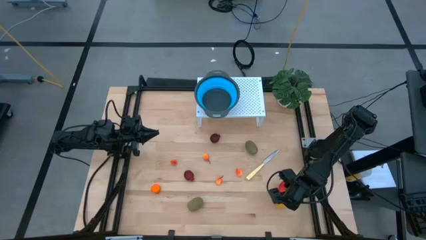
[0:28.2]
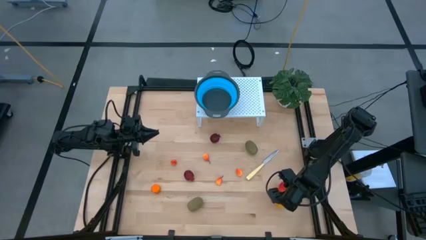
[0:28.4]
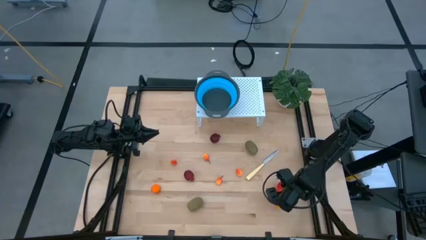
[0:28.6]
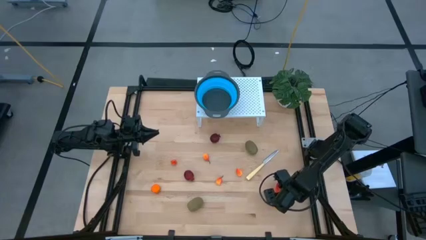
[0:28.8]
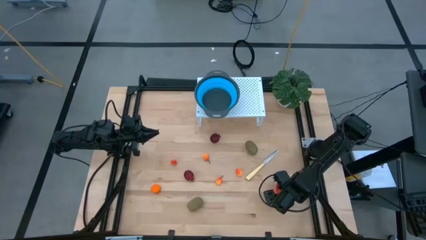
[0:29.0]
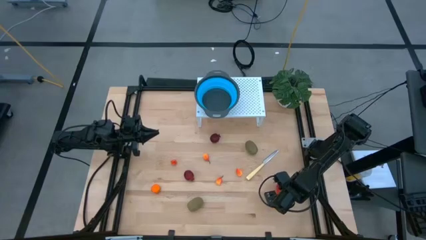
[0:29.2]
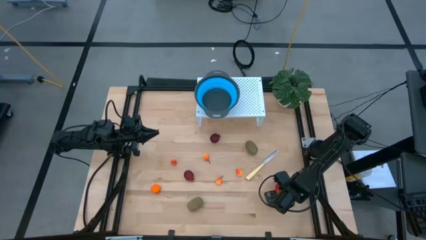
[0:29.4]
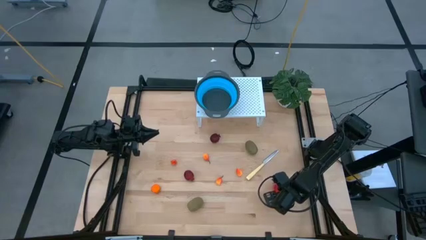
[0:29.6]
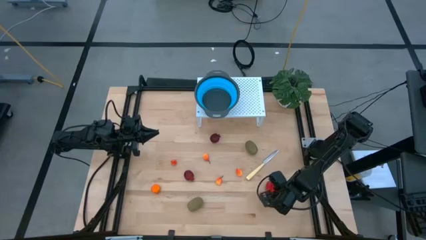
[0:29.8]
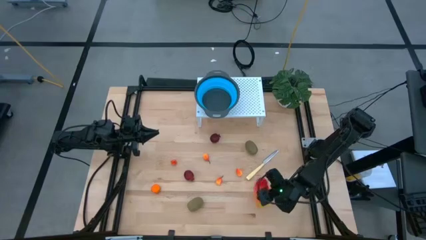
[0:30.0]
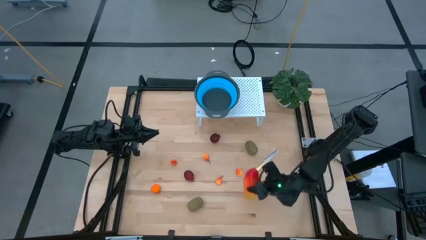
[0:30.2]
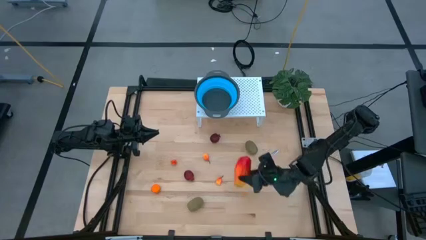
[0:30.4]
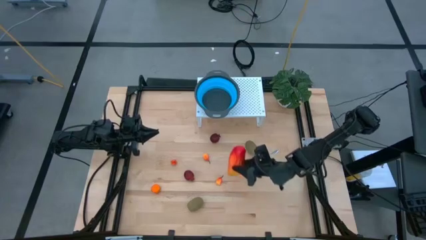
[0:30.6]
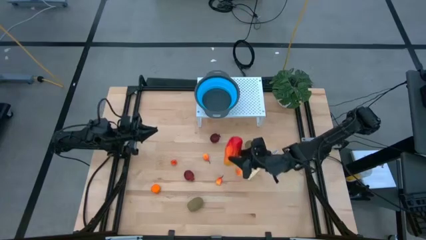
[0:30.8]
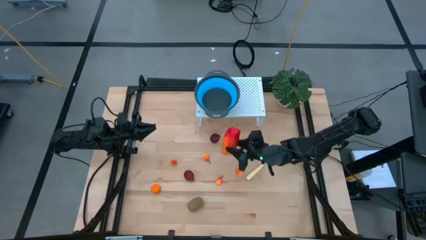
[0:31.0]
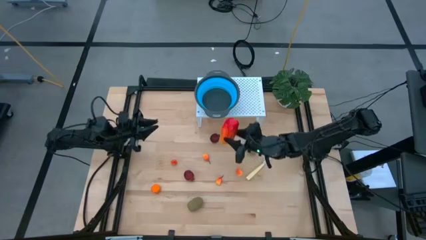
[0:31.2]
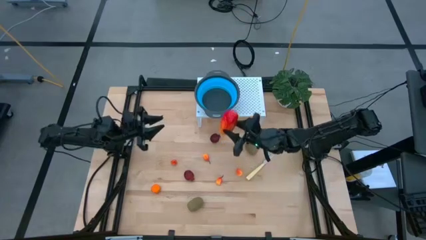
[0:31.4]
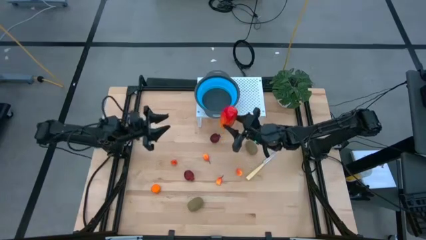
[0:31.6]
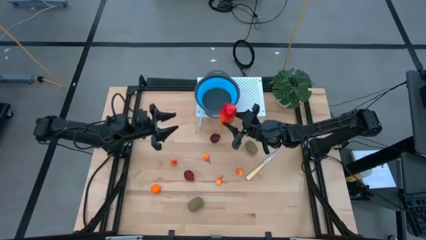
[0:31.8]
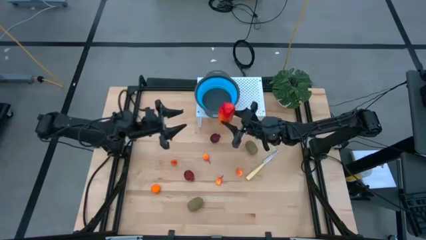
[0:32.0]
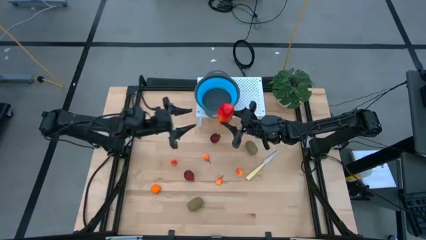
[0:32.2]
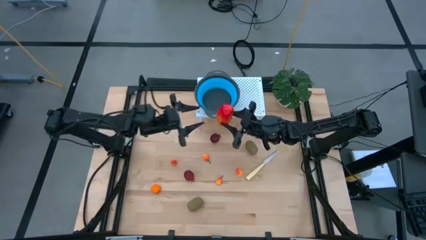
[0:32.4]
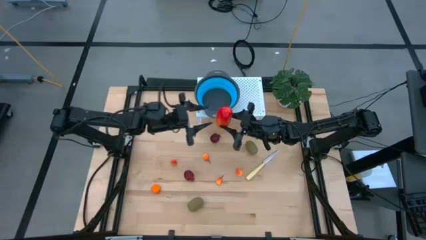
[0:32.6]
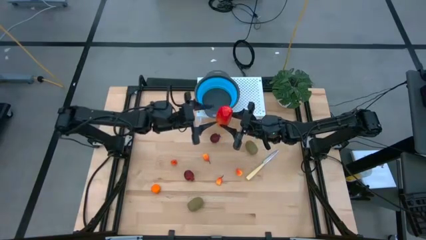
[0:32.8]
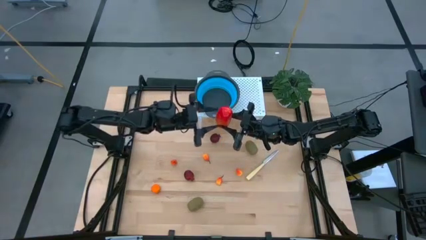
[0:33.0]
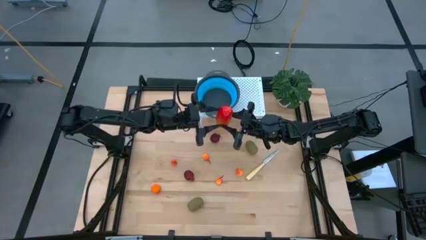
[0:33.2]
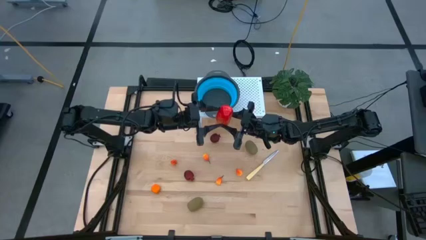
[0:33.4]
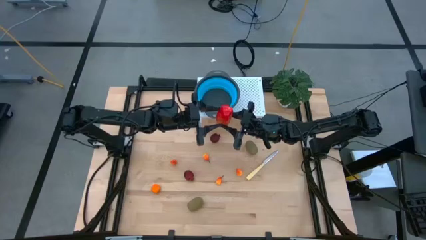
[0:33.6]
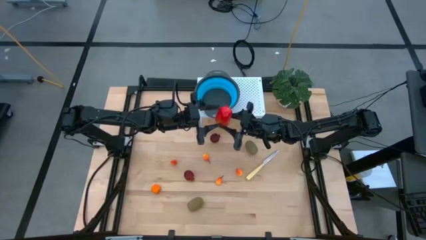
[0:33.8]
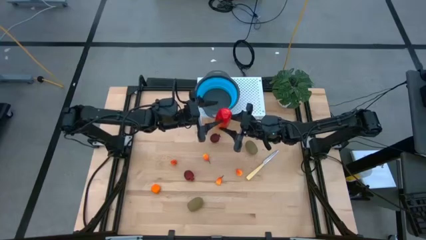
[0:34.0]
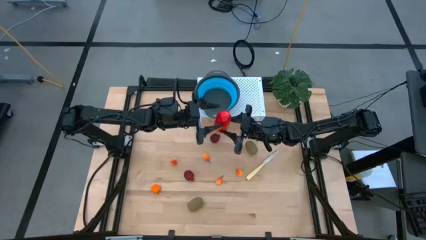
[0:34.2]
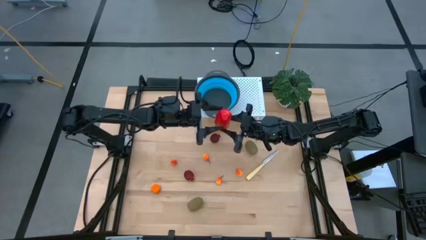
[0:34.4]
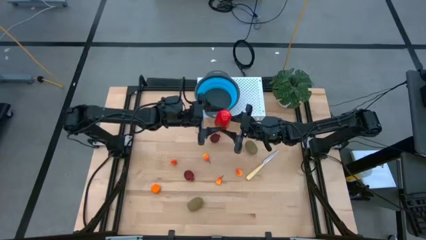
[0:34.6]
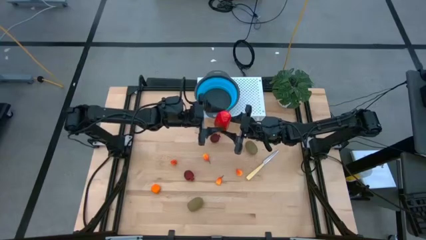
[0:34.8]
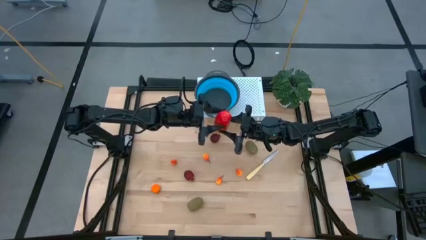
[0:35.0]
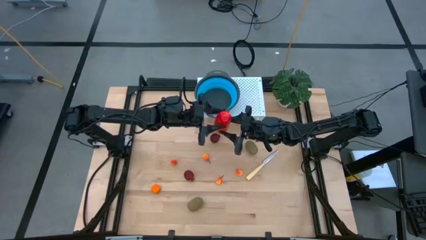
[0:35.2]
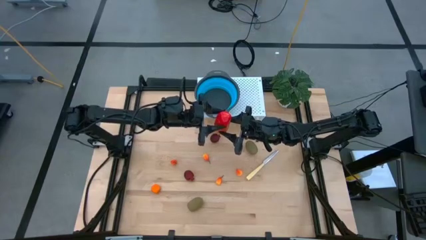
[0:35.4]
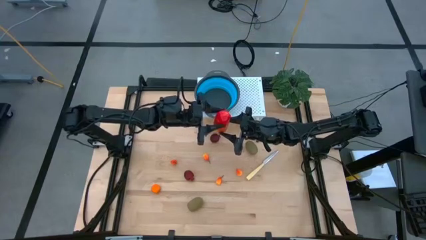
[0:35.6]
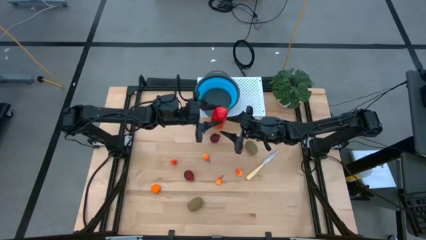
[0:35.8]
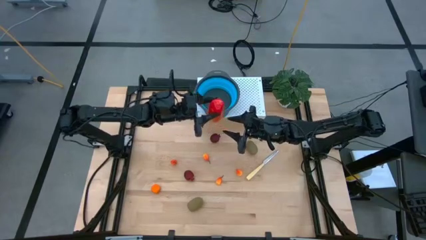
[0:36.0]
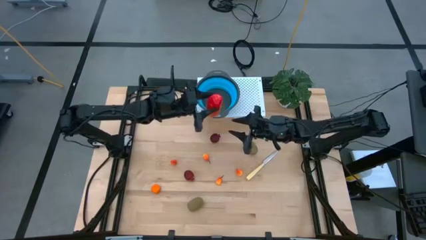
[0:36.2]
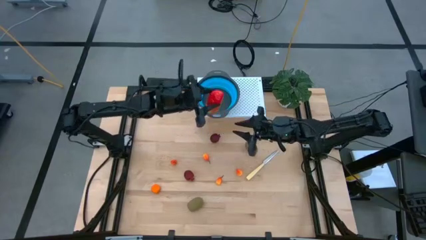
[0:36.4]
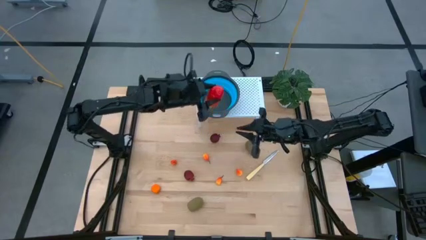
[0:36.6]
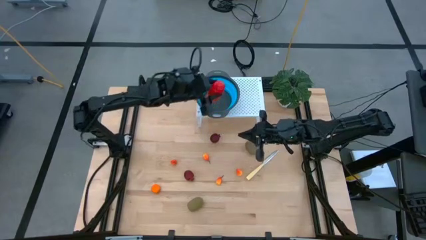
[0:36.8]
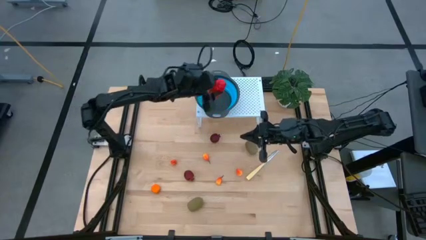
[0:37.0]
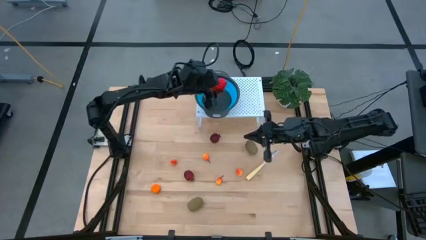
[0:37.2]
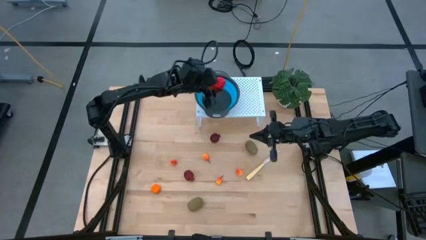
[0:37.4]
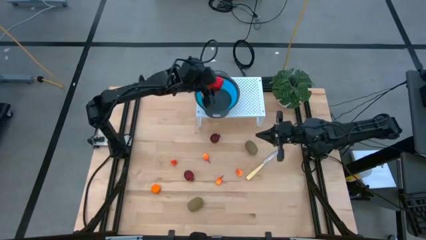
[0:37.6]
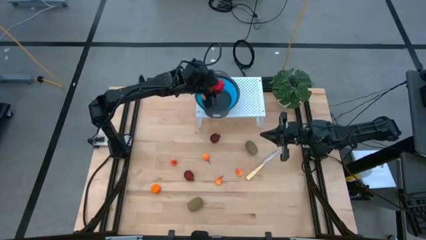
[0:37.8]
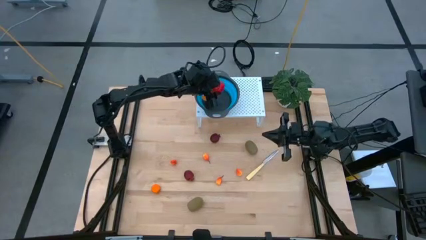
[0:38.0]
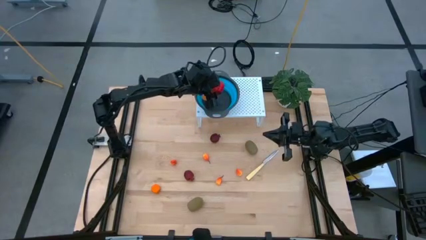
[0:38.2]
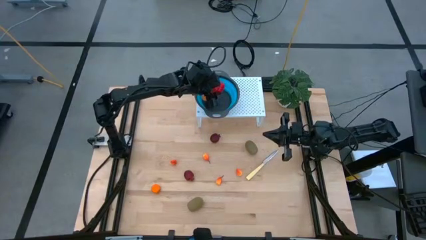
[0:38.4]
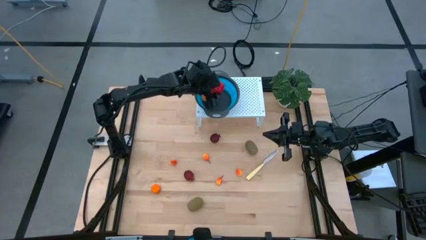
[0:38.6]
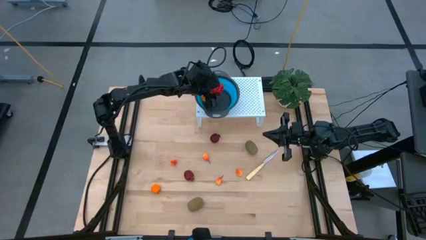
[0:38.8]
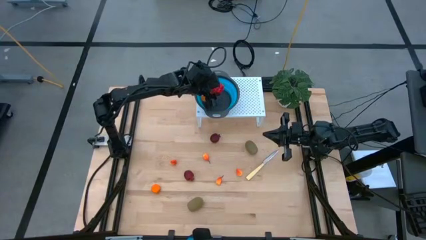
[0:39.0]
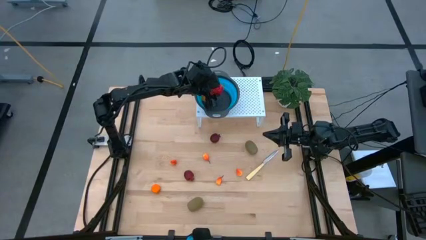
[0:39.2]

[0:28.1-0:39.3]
Task: Pick & Place Fruit
Put the mango into the blue strainer bowl on the shelf
